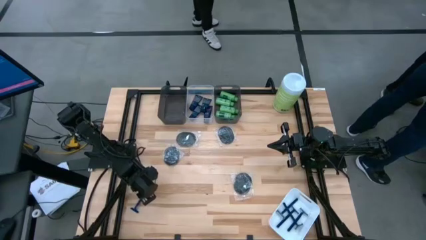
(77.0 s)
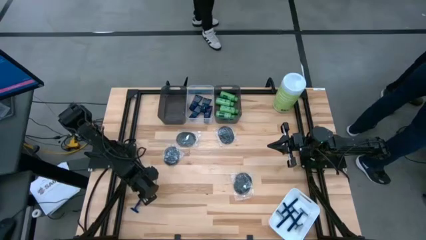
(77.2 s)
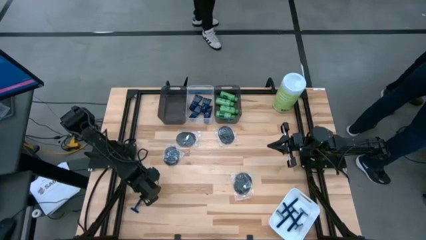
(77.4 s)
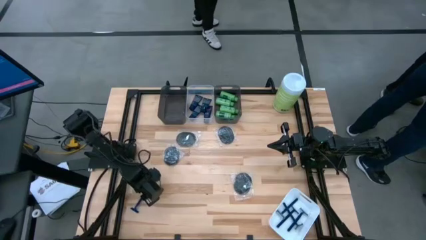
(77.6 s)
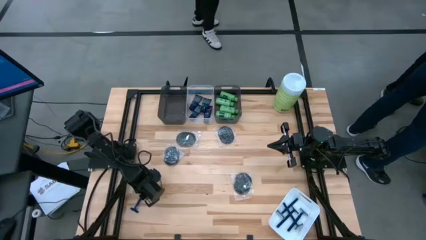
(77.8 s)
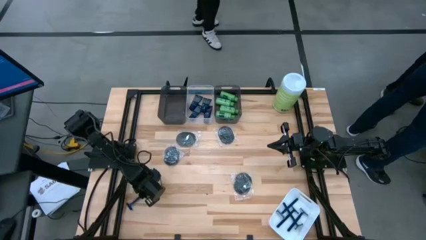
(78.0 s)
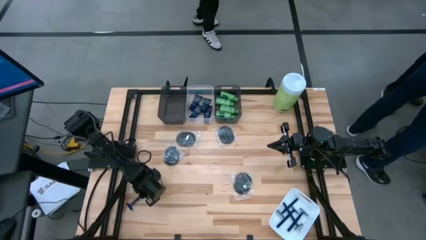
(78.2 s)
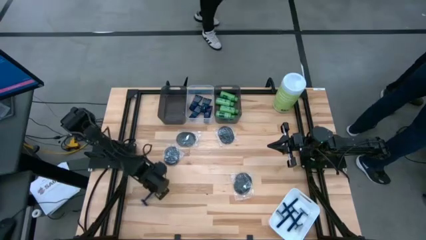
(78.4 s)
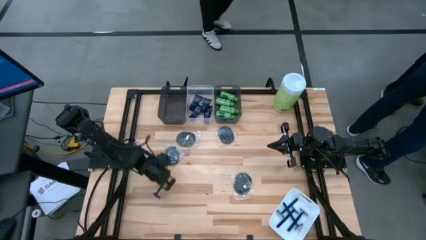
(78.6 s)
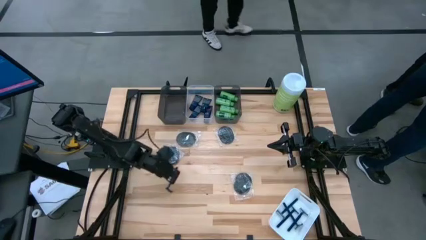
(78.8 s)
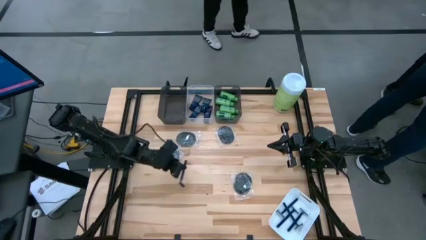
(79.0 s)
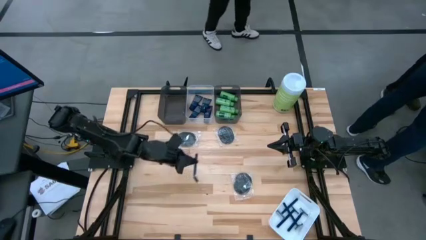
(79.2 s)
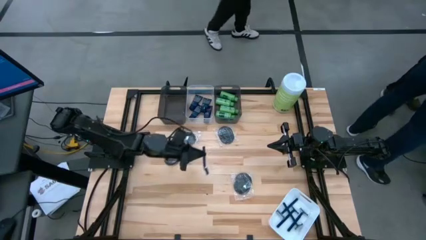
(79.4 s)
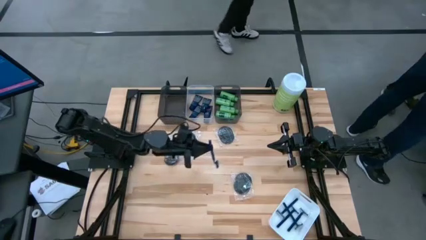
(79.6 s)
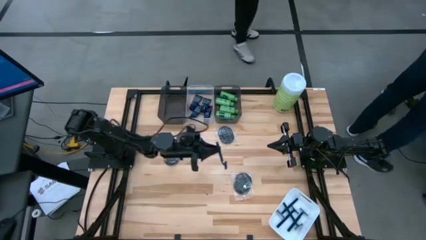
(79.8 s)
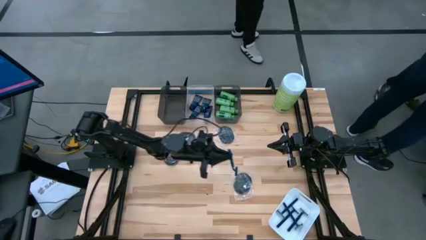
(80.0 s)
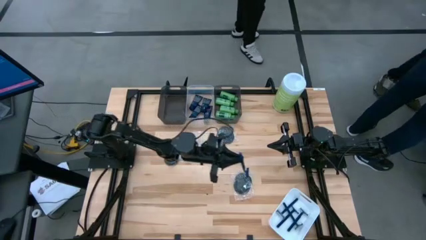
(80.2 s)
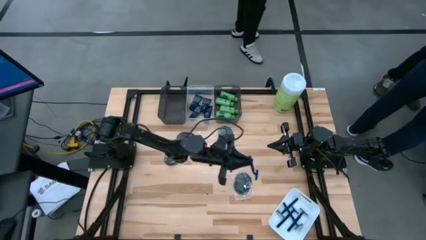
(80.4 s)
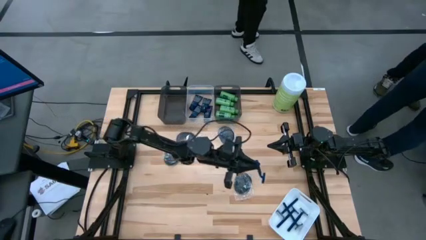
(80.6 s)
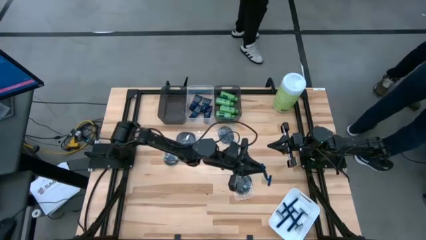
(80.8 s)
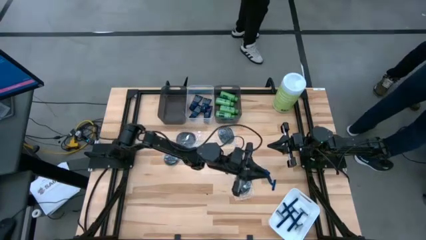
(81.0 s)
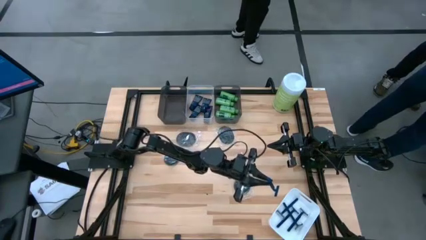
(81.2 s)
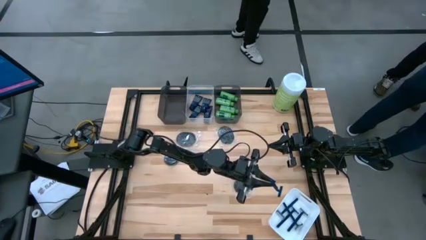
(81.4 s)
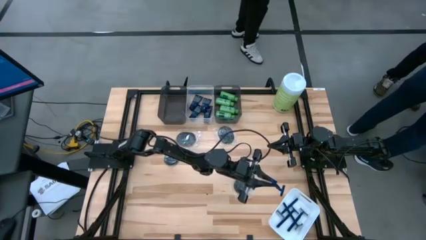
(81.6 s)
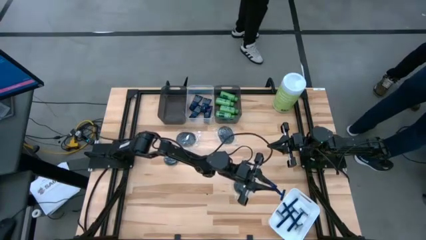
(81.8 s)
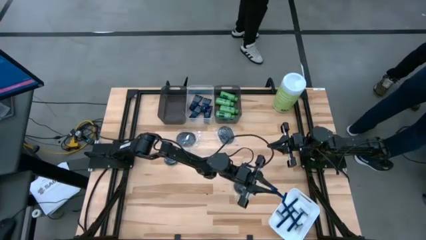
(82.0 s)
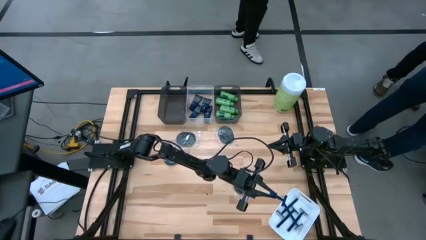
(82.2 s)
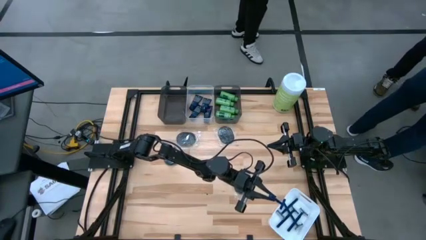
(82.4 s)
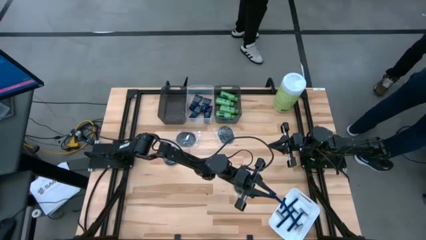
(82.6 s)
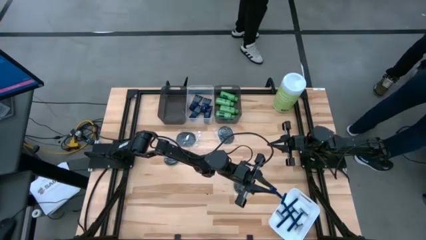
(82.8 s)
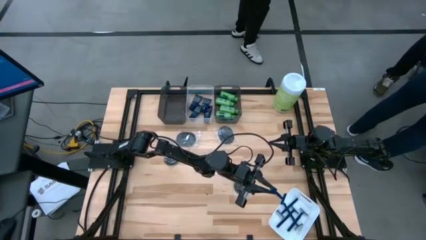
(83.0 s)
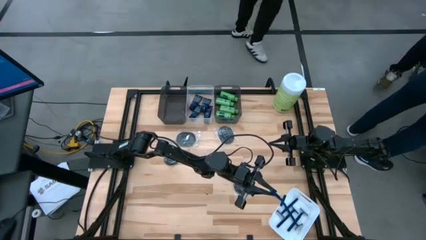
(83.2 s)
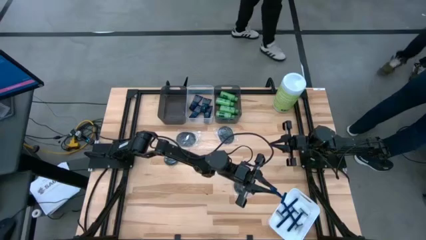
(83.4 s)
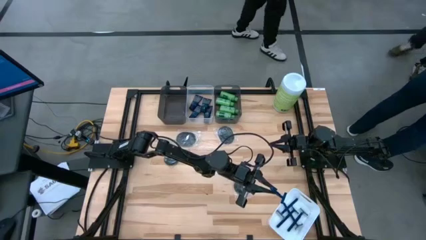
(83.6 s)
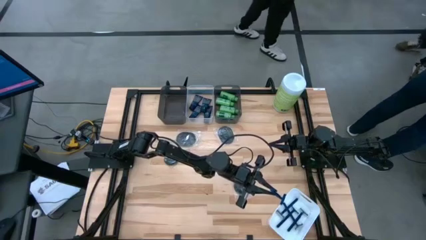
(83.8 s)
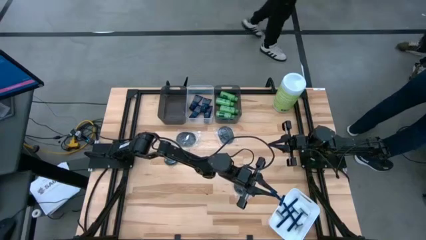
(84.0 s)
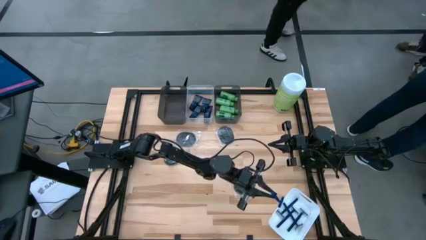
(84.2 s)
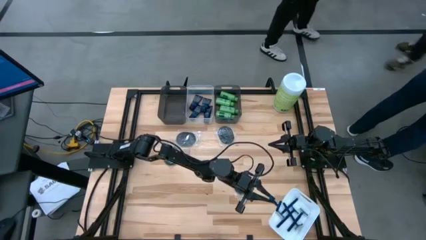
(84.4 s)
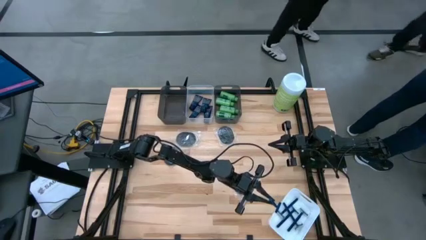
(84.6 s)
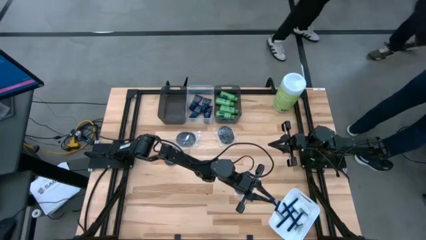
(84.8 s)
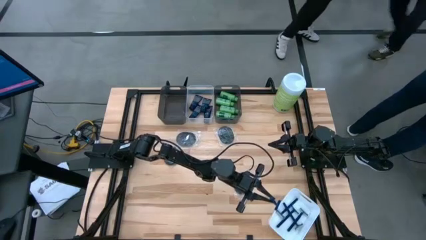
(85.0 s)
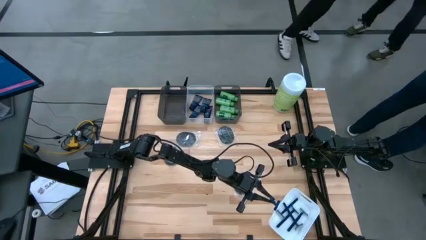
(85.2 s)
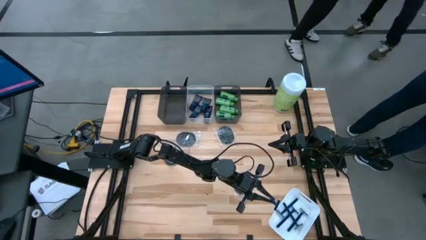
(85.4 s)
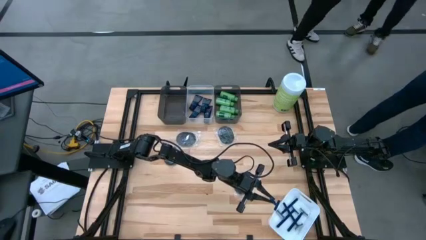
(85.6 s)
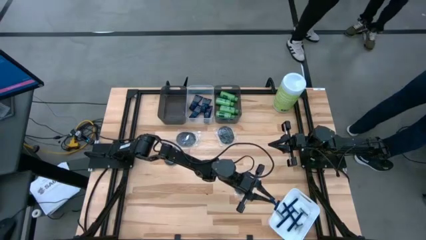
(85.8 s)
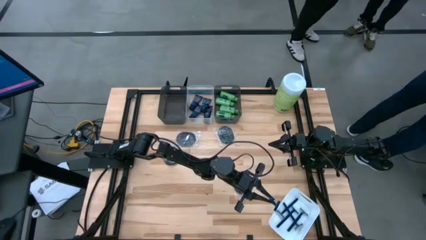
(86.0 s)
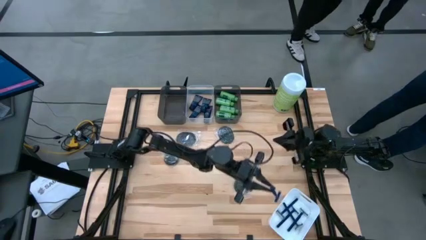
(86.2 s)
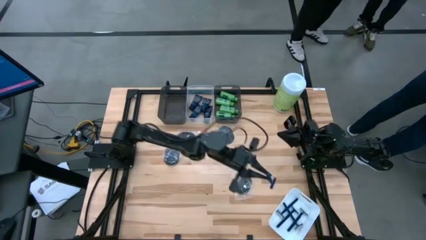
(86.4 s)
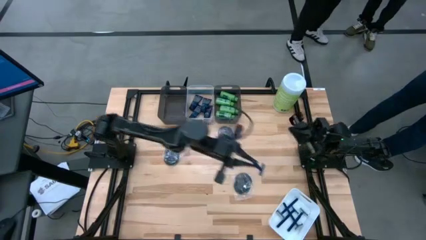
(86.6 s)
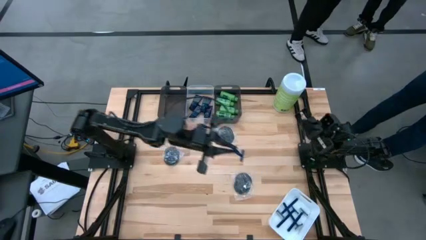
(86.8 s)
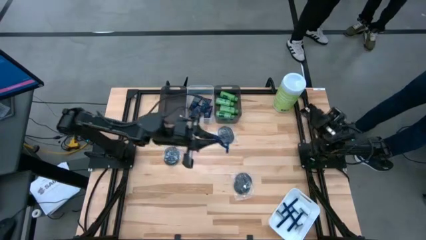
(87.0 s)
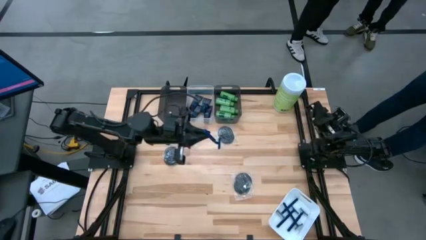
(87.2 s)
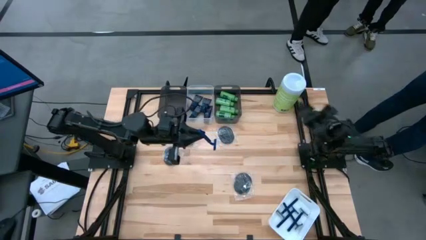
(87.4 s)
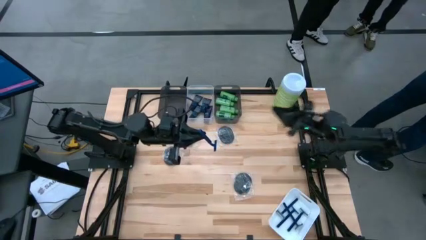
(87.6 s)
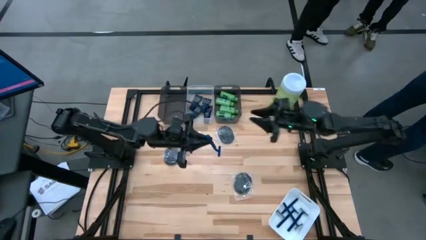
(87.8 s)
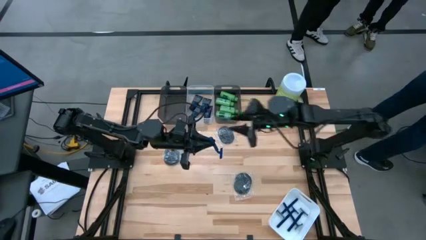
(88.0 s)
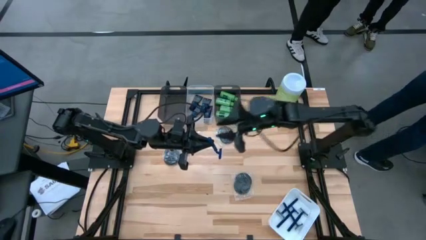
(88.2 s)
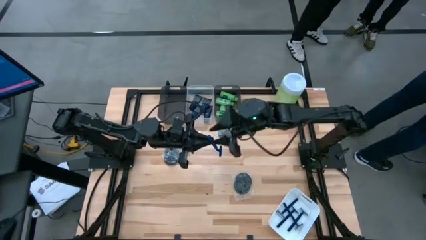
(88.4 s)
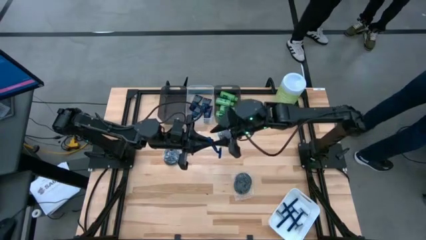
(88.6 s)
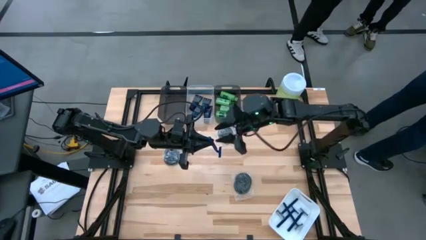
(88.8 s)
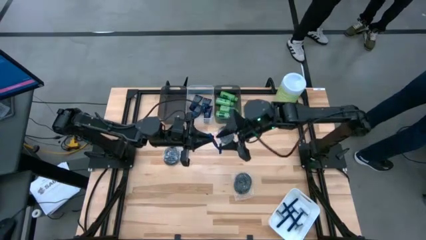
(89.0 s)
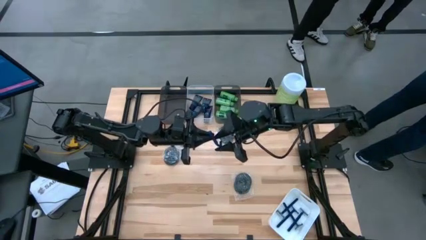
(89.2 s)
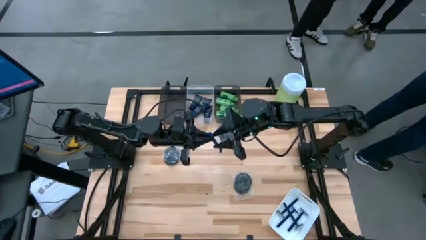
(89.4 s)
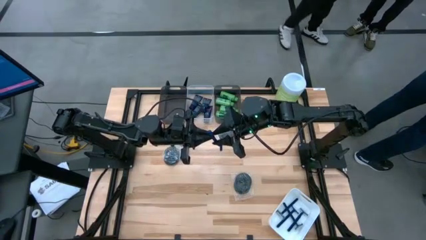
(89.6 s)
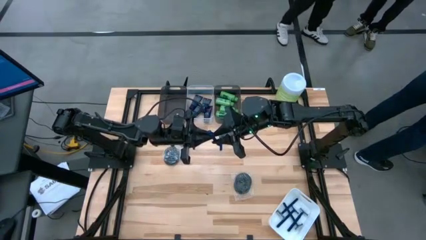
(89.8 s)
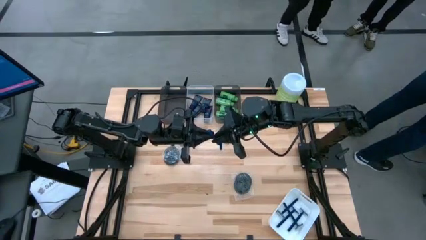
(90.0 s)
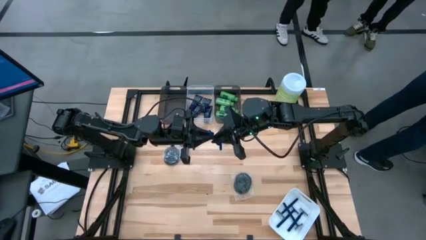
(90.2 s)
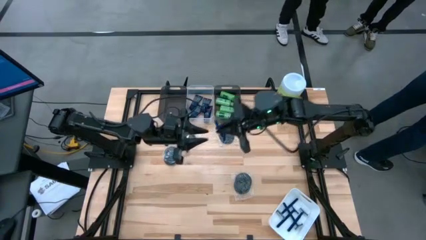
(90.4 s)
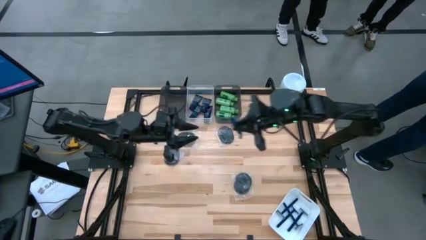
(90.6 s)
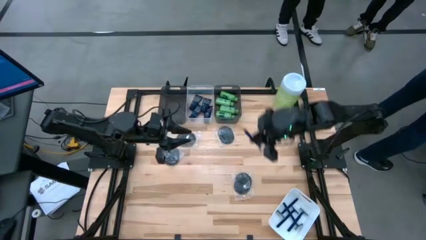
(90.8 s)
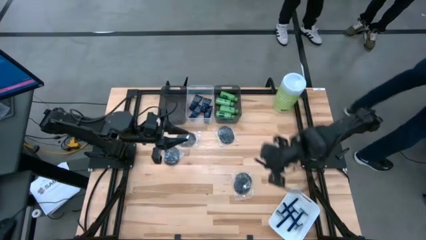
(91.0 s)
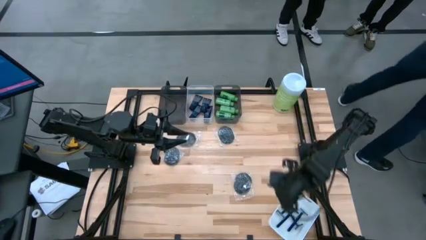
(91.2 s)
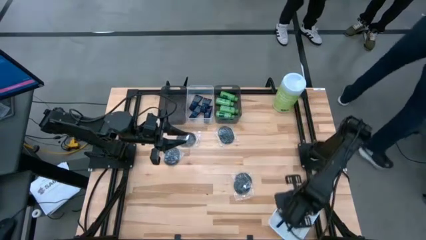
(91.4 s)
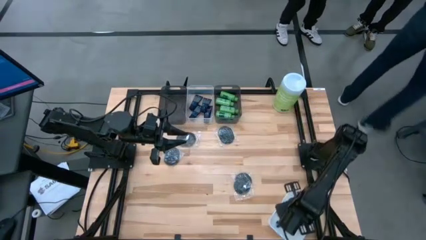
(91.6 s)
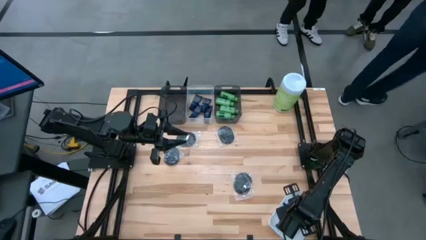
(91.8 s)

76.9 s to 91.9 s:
Task: Pick & Place Travel size toiletries
Put the blue razor into the white bin

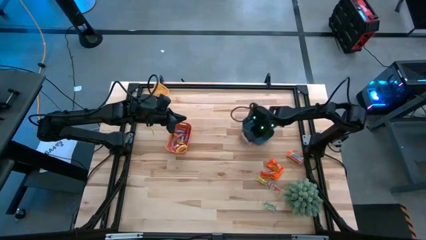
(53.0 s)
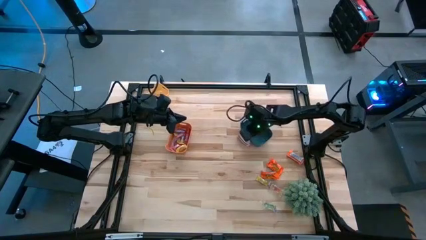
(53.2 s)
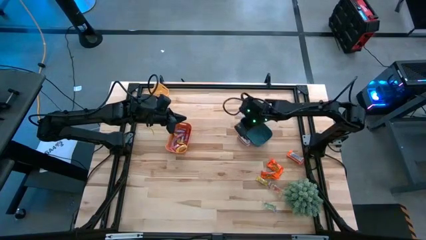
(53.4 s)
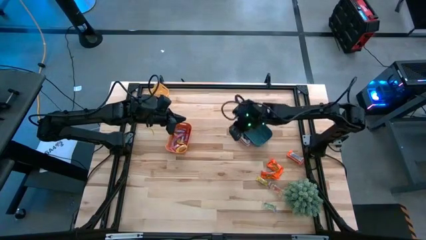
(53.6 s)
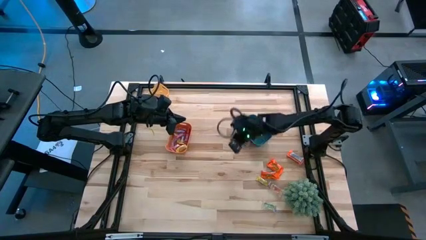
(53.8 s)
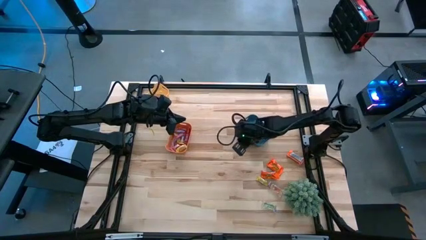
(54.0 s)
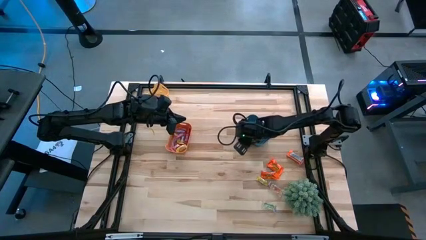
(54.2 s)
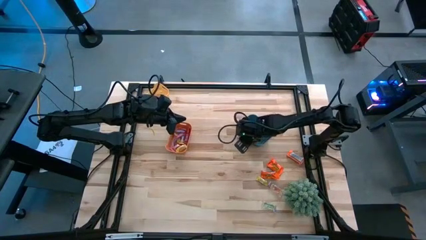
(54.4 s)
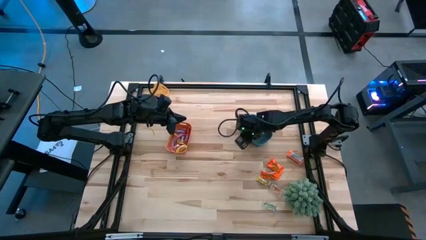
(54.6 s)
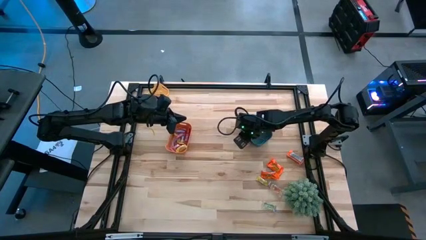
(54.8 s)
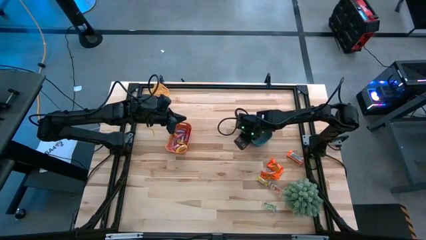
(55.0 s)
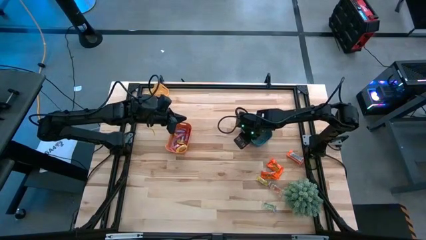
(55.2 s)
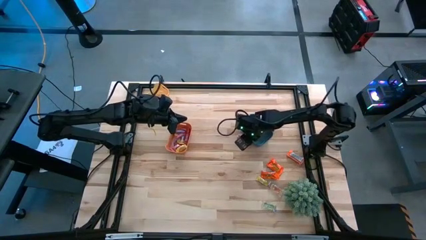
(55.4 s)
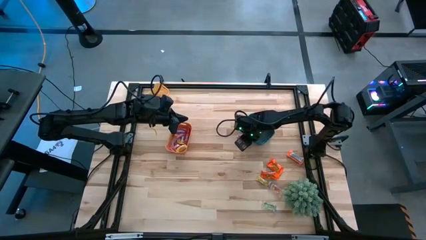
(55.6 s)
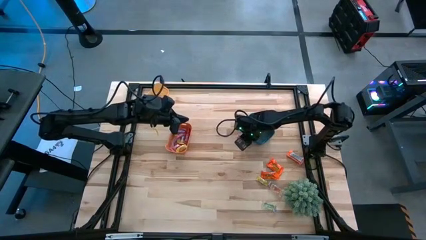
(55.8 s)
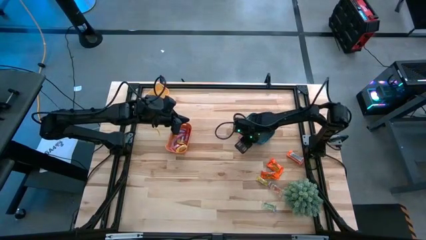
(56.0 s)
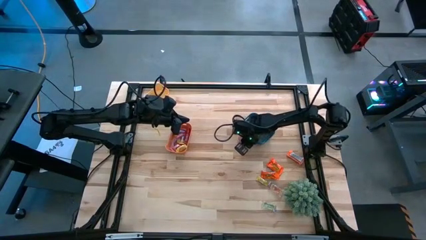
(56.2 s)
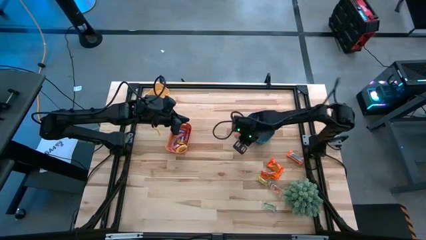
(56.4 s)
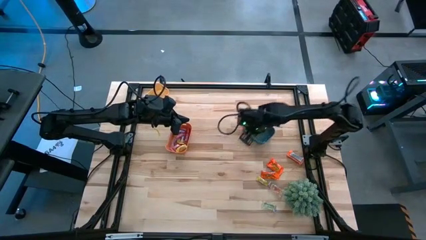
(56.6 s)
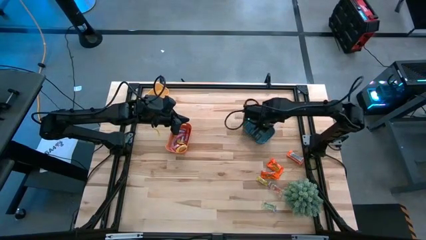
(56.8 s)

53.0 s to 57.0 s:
Task: Sort candy
Put the top left orange chocolate into the blue bin
